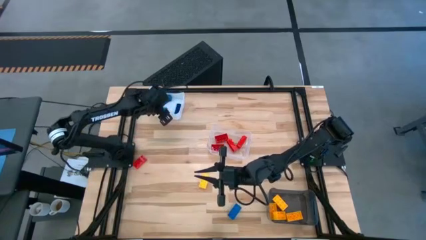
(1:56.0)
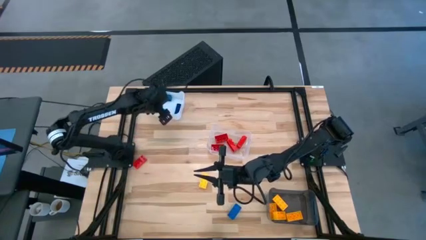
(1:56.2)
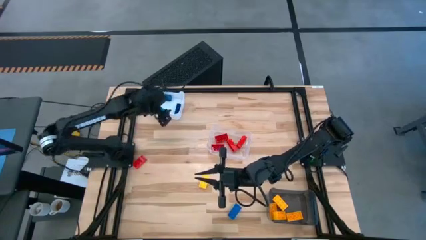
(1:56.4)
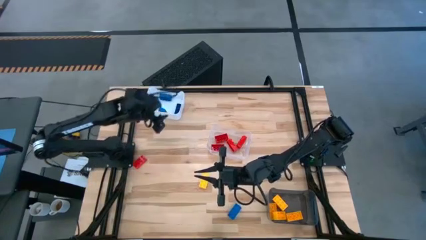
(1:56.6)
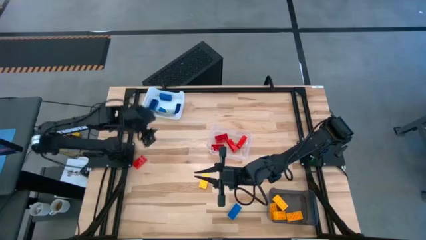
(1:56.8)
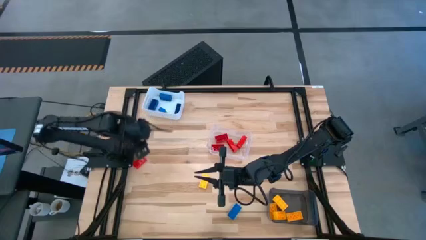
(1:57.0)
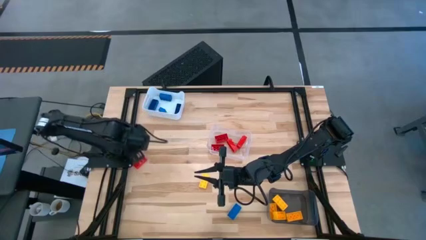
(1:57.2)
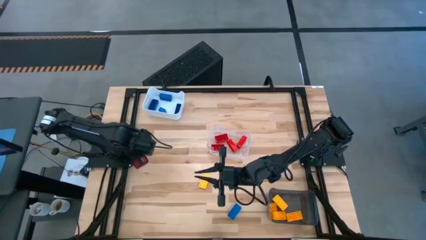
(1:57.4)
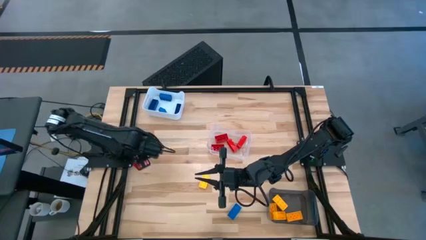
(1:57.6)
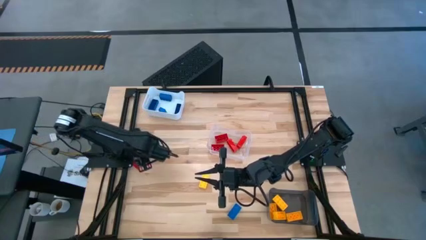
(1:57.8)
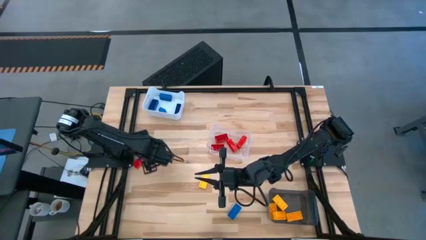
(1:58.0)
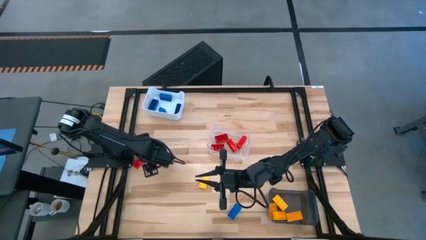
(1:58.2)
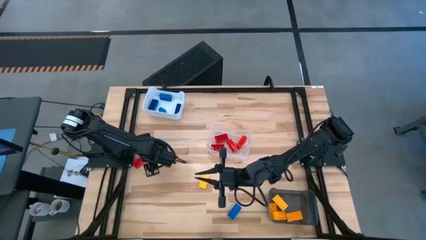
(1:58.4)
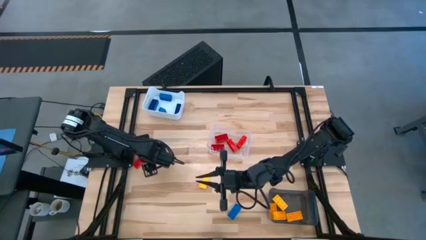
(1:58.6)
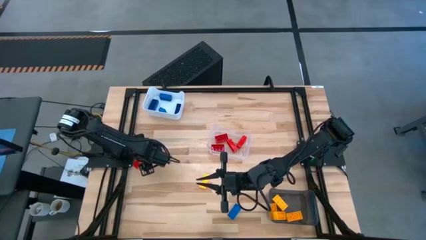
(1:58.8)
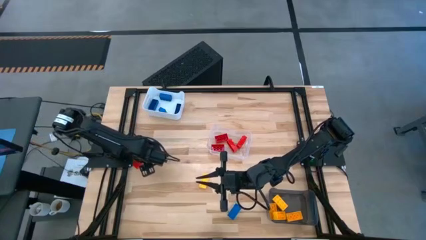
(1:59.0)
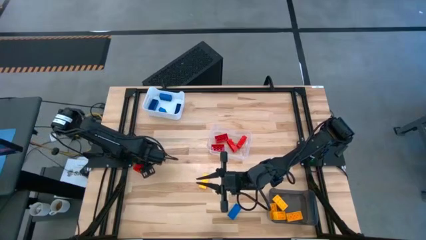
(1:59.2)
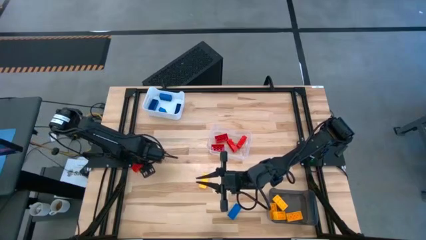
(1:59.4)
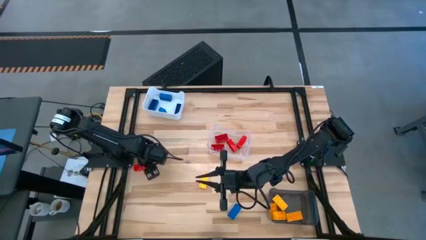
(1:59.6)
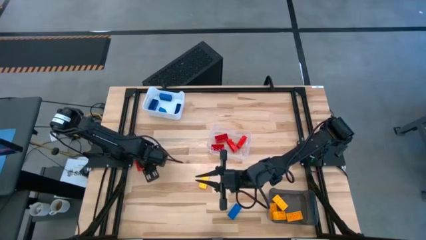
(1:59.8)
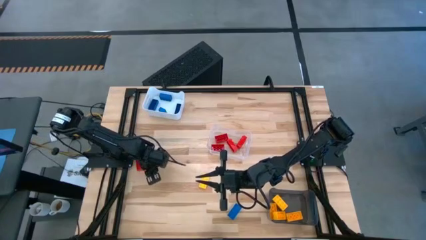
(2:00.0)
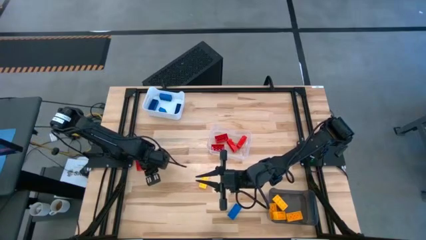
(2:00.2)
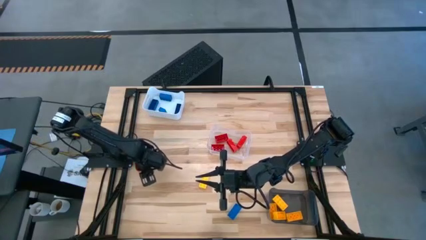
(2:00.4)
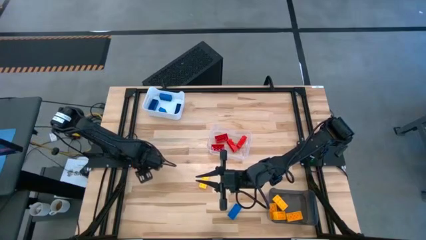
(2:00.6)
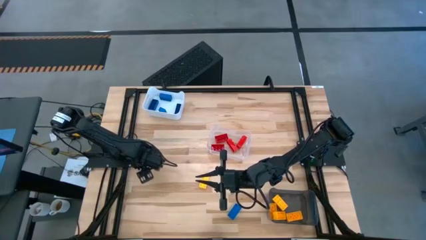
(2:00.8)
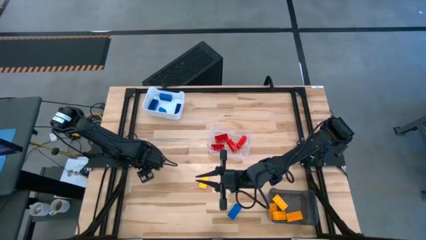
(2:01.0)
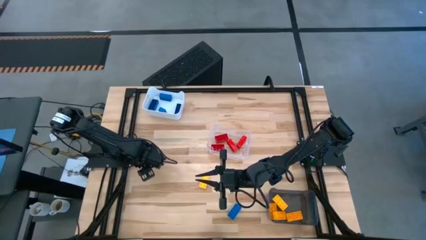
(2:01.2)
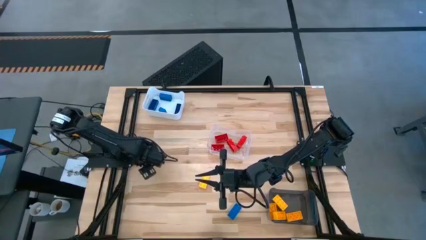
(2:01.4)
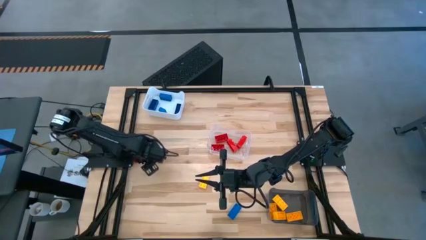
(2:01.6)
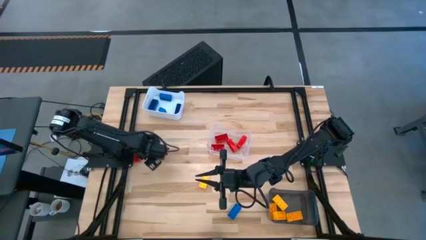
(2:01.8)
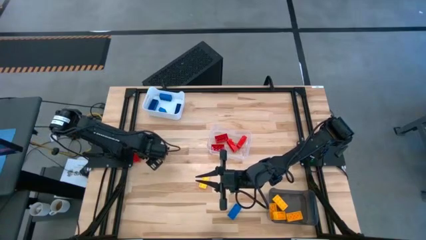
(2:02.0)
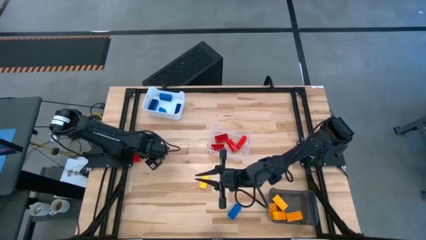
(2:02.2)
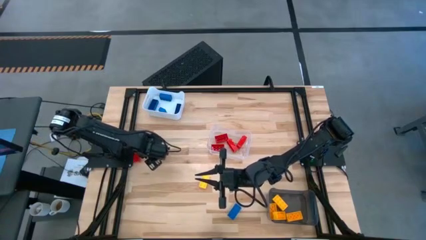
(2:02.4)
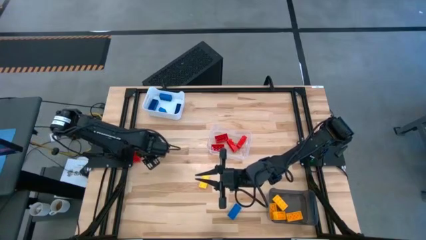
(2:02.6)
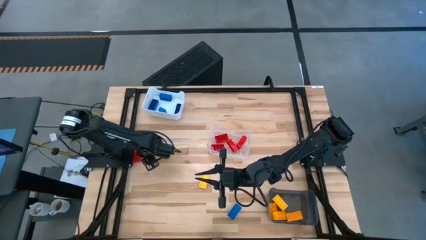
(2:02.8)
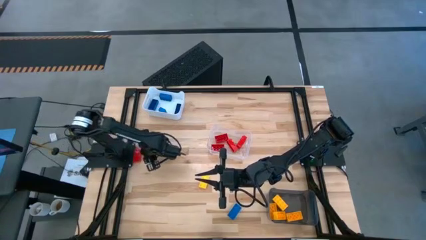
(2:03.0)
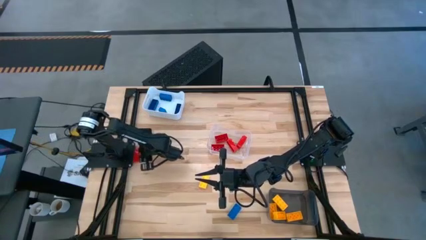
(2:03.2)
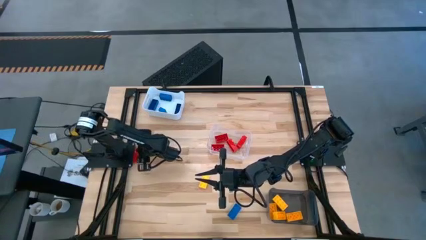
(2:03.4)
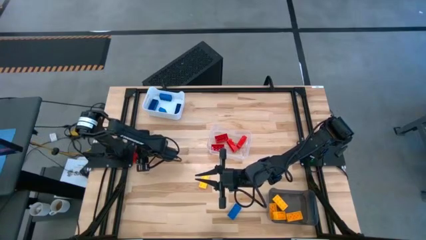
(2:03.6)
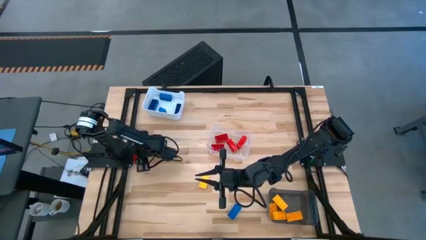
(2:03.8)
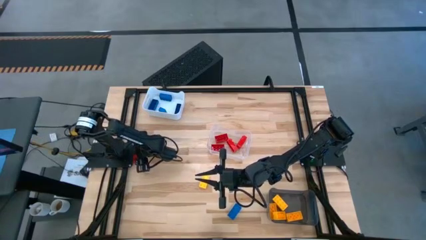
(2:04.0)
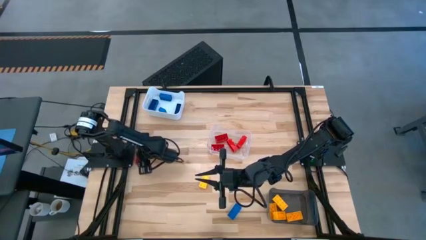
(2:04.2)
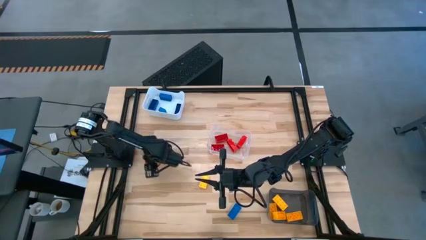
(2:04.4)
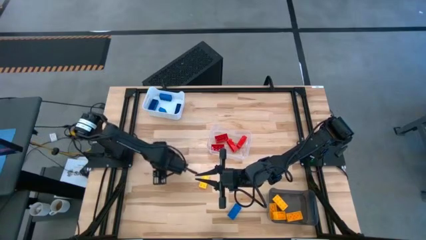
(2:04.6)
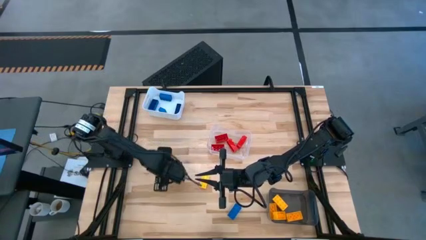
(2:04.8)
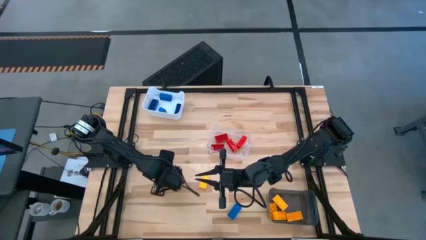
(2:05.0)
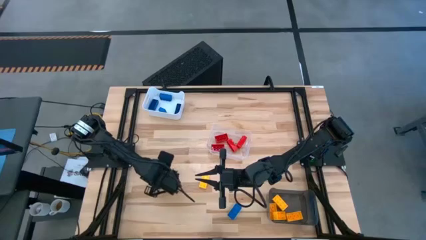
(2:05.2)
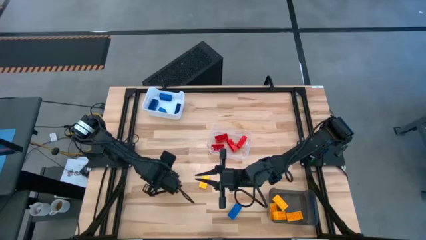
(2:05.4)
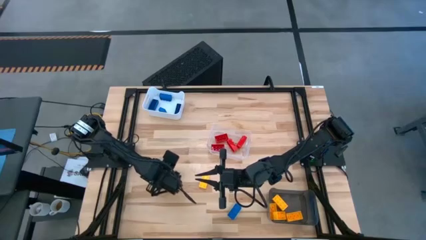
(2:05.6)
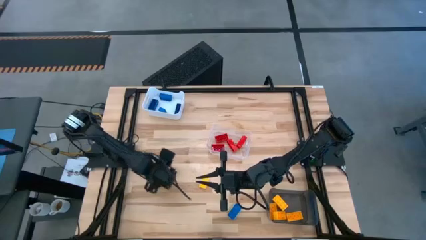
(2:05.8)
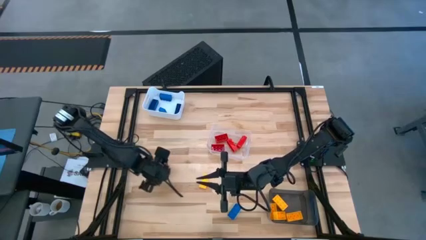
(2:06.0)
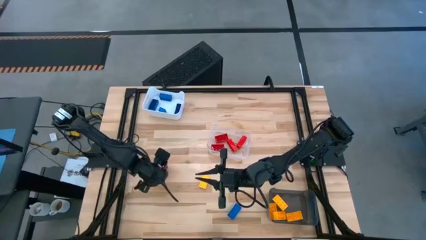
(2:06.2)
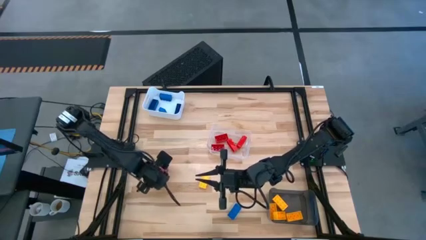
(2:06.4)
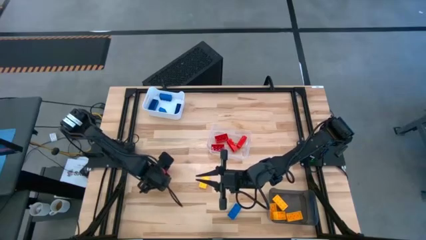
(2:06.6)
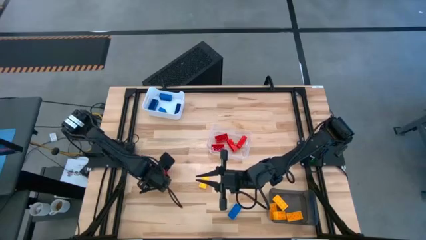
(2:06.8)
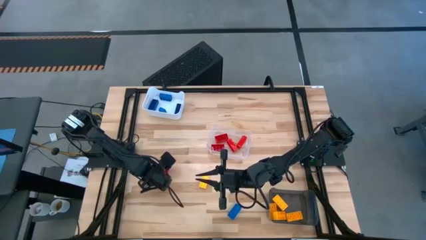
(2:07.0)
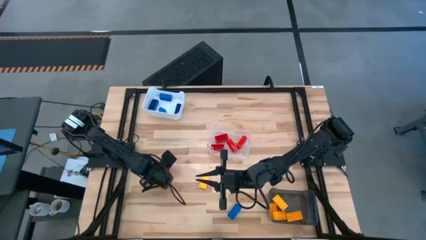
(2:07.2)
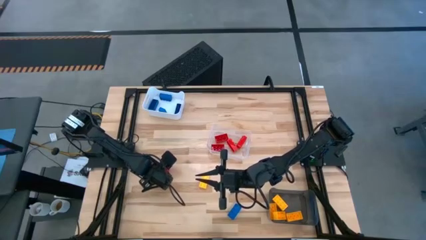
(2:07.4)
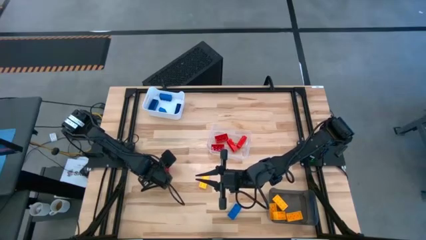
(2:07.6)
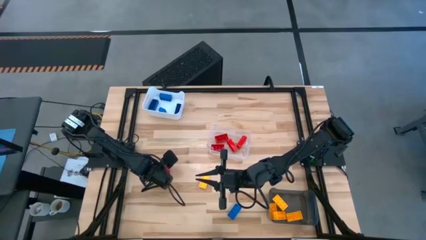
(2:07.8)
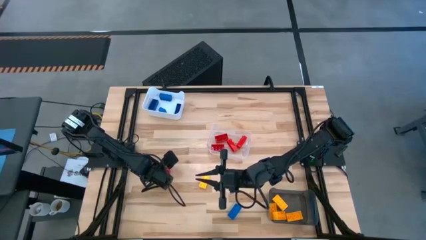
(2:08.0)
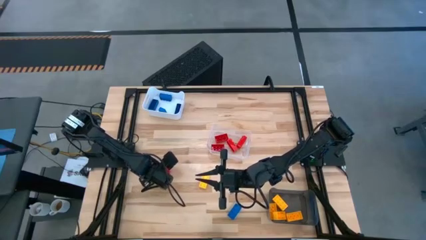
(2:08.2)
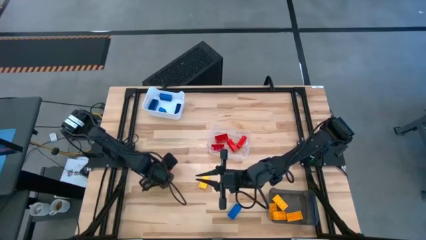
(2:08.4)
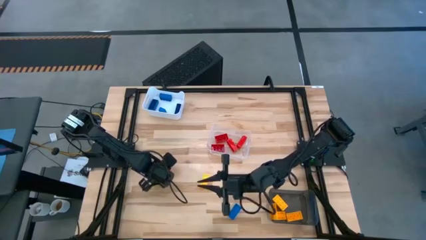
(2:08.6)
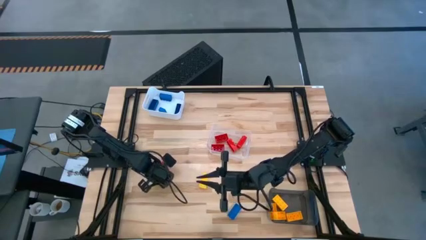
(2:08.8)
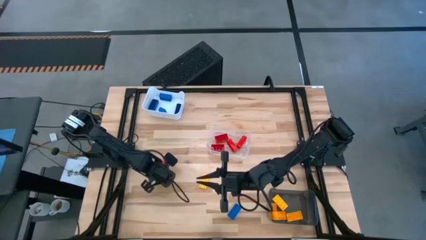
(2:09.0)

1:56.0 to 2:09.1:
Task: Sort & place blocks by color
Put the red game piece into the transparent bin

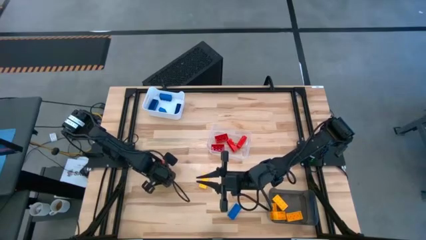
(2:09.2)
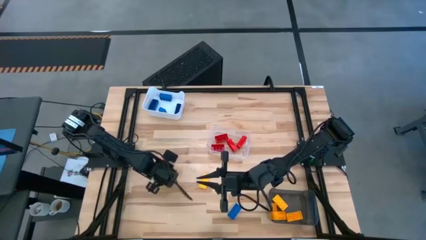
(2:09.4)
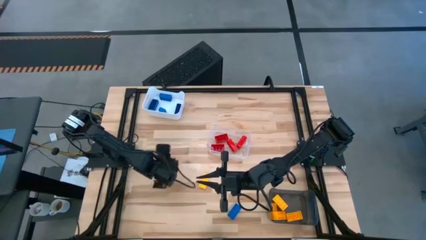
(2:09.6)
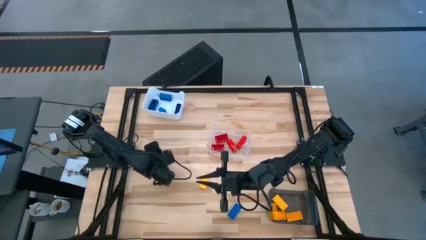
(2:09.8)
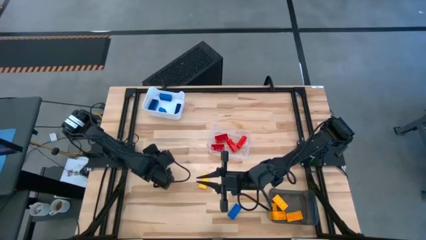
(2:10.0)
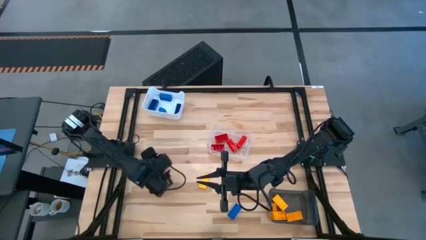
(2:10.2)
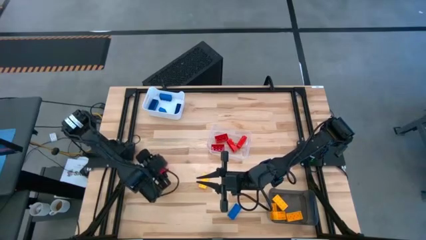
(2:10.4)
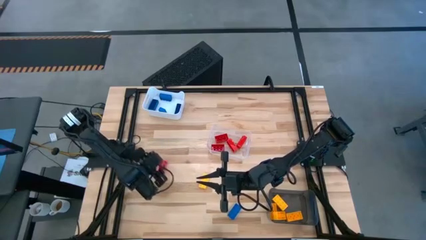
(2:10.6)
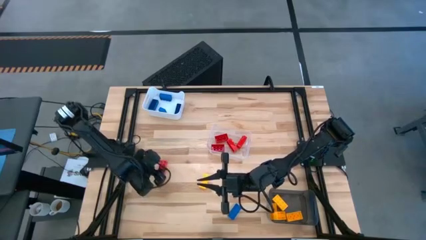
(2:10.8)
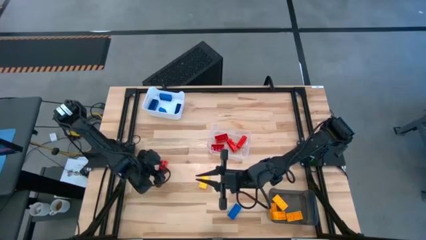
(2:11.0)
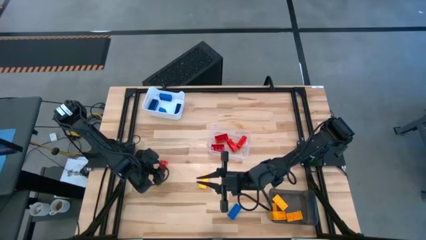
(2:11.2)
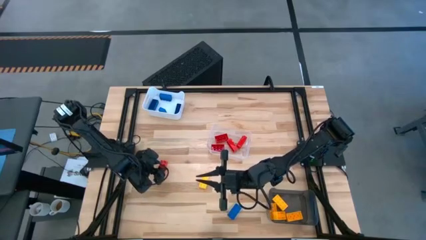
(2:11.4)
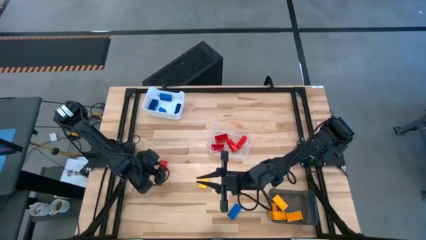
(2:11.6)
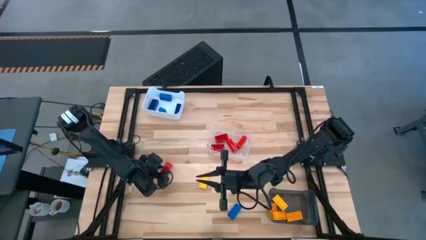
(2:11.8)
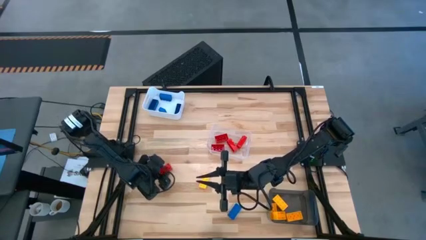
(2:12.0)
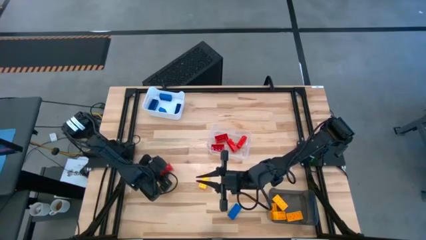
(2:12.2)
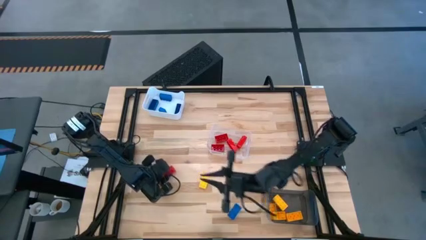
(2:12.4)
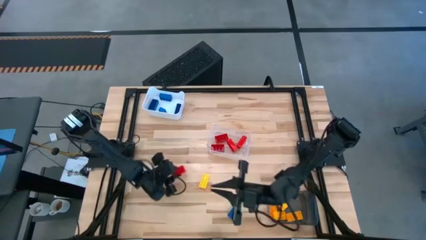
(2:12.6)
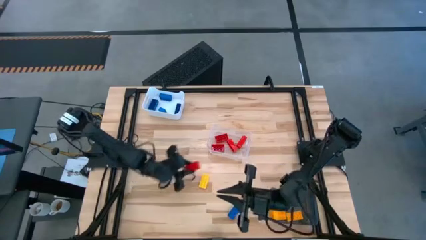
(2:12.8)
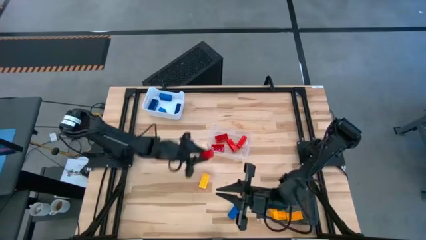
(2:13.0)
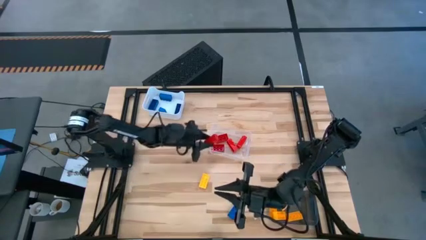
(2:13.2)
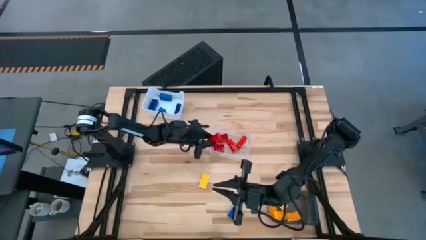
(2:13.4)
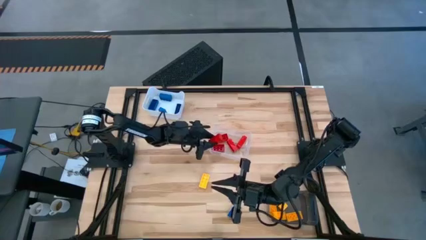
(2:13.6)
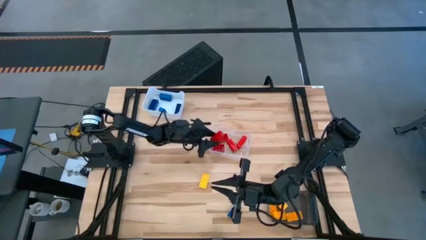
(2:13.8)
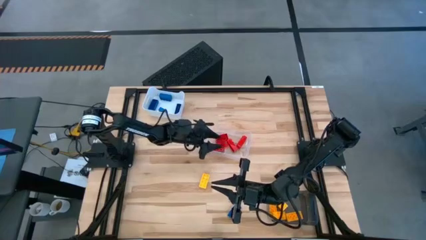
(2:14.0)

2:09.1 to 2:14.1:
Put the red game piece into the transparent bin
